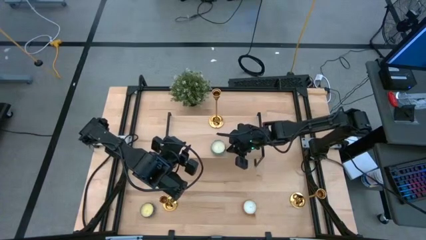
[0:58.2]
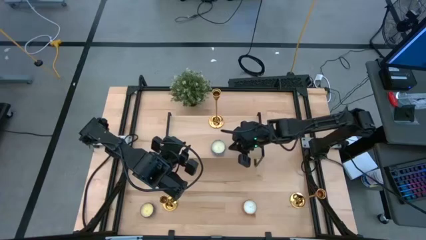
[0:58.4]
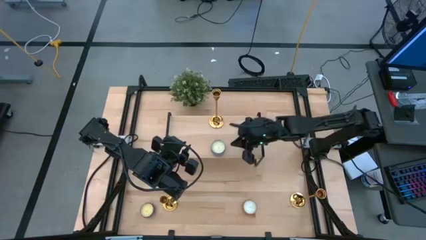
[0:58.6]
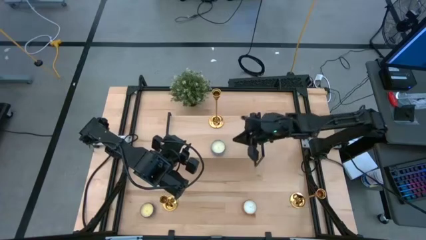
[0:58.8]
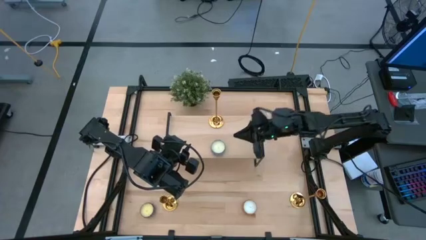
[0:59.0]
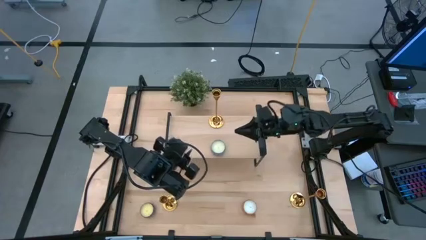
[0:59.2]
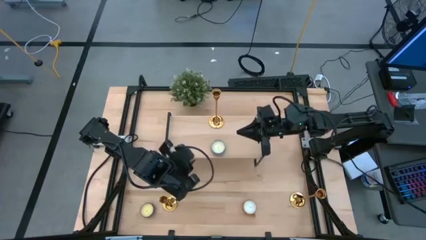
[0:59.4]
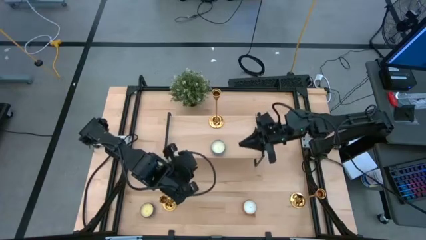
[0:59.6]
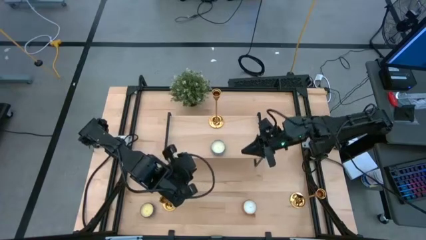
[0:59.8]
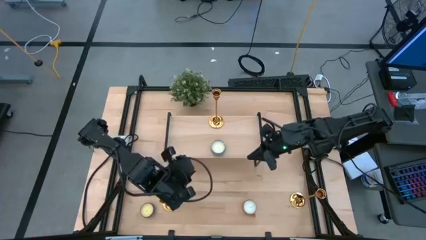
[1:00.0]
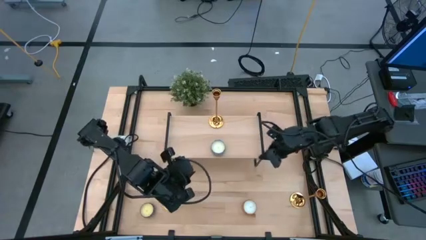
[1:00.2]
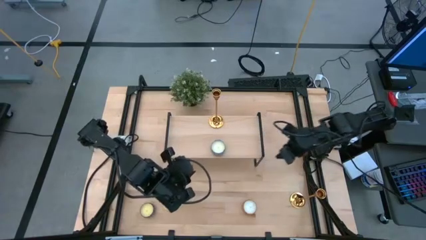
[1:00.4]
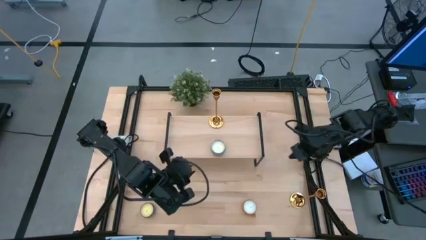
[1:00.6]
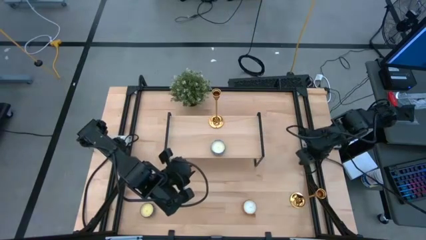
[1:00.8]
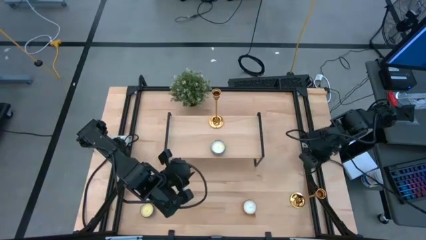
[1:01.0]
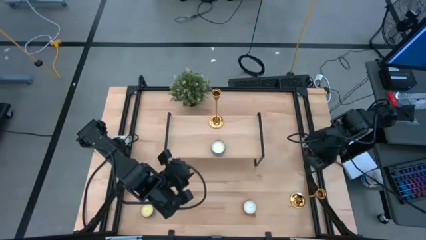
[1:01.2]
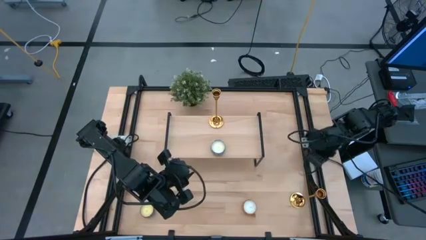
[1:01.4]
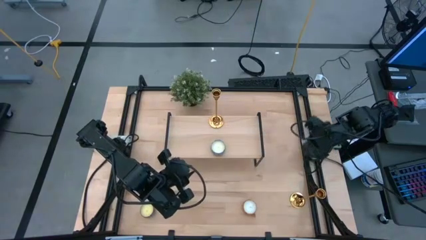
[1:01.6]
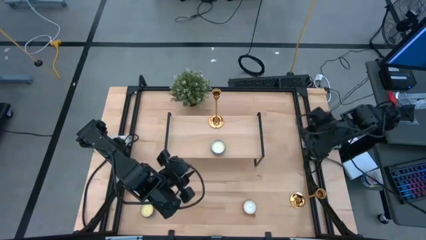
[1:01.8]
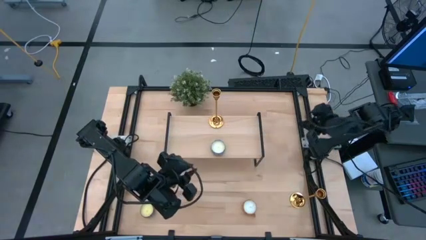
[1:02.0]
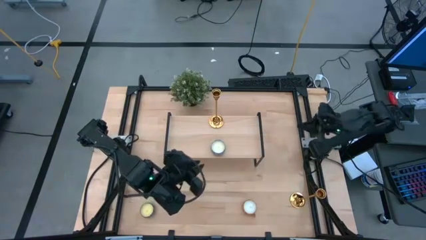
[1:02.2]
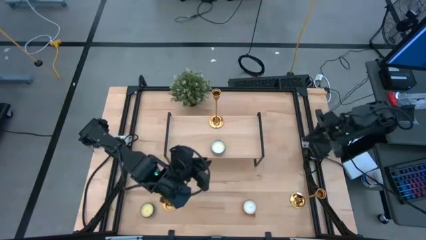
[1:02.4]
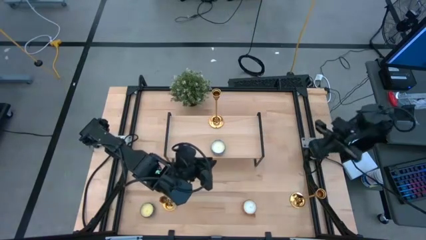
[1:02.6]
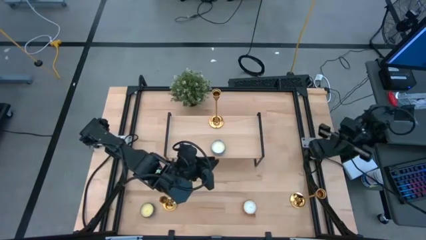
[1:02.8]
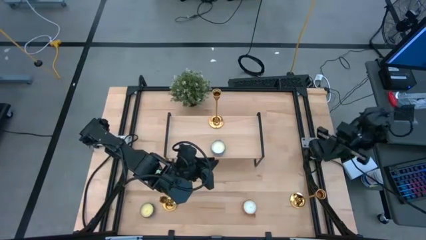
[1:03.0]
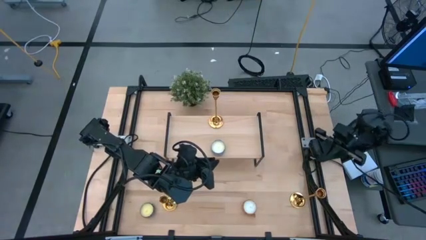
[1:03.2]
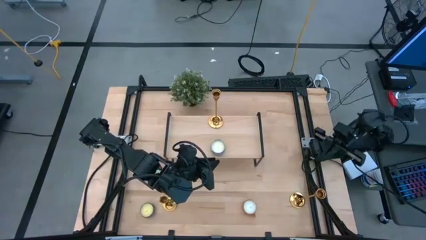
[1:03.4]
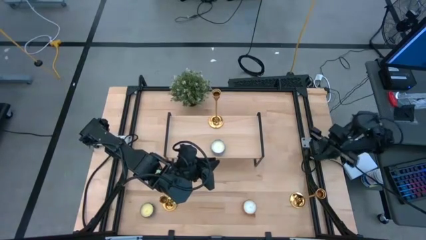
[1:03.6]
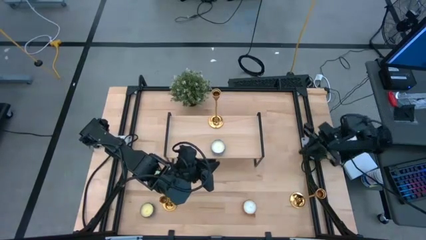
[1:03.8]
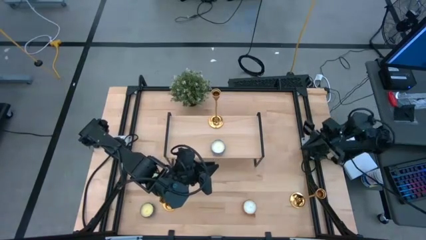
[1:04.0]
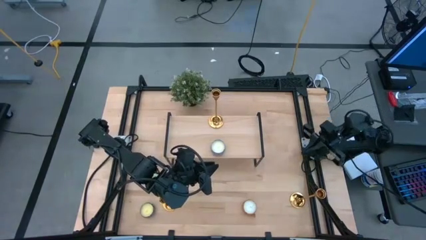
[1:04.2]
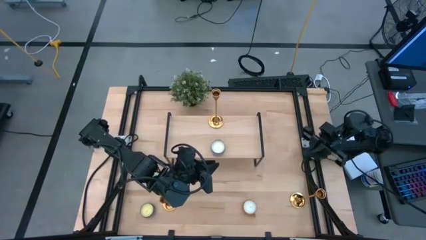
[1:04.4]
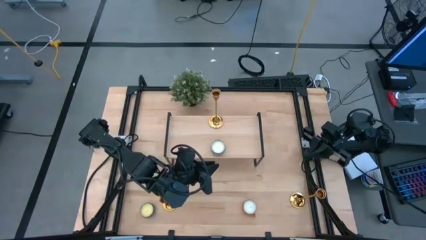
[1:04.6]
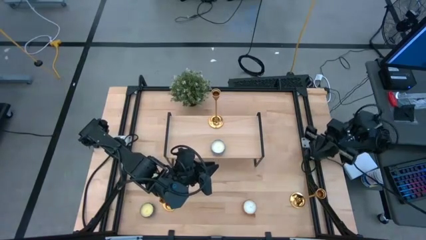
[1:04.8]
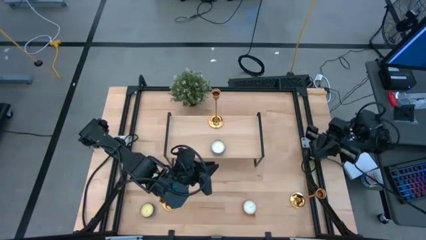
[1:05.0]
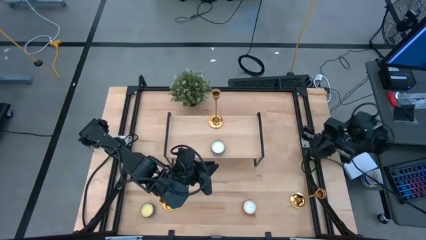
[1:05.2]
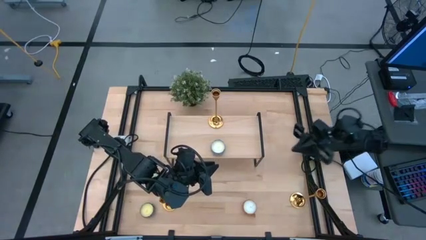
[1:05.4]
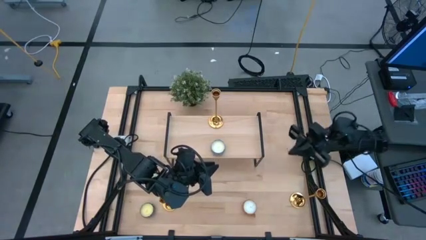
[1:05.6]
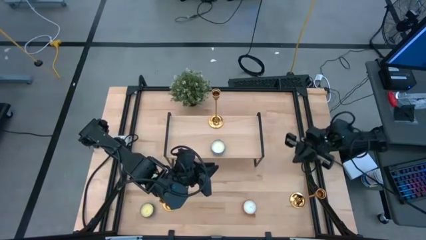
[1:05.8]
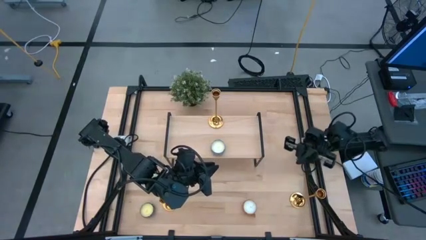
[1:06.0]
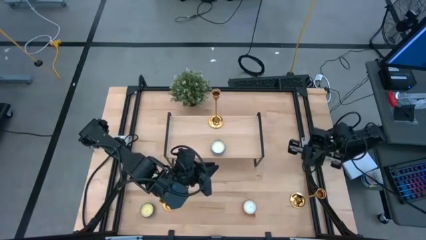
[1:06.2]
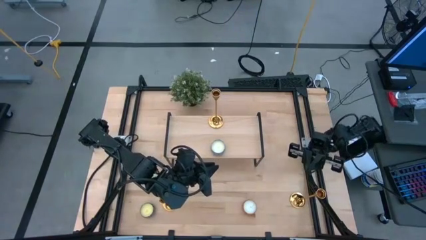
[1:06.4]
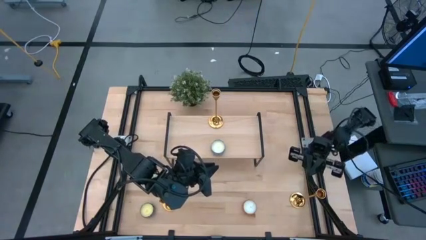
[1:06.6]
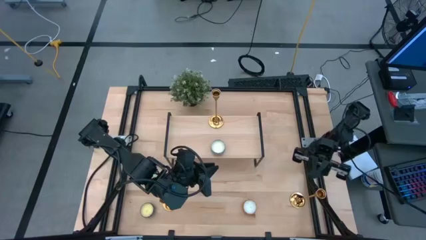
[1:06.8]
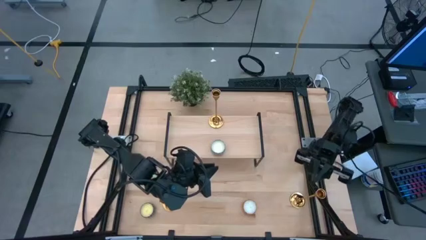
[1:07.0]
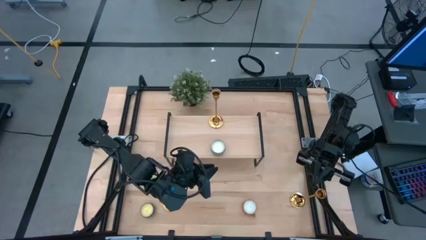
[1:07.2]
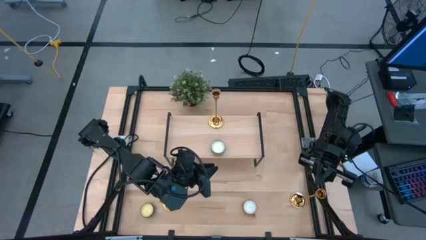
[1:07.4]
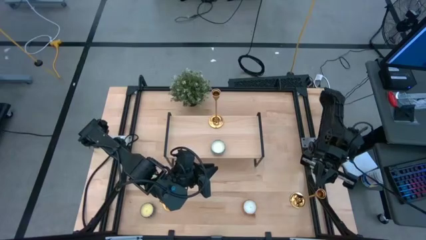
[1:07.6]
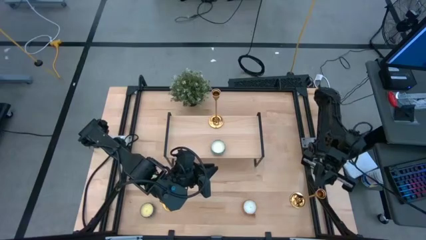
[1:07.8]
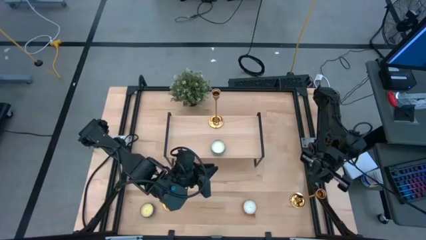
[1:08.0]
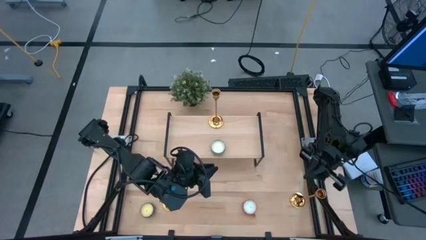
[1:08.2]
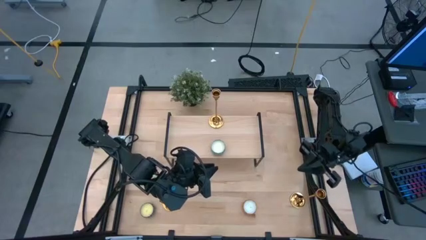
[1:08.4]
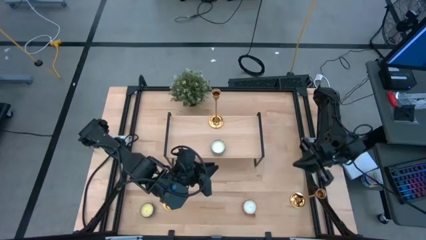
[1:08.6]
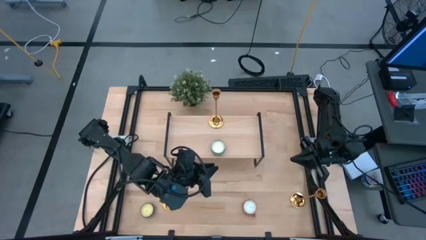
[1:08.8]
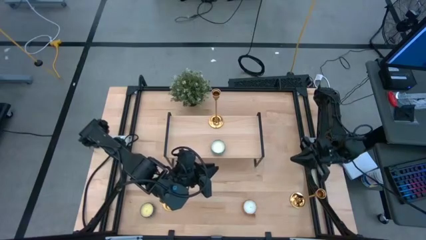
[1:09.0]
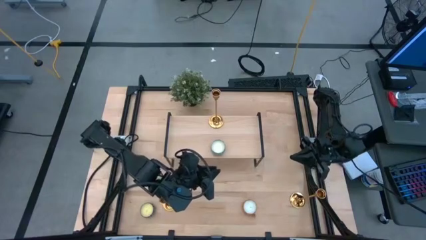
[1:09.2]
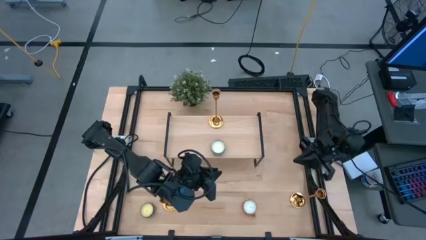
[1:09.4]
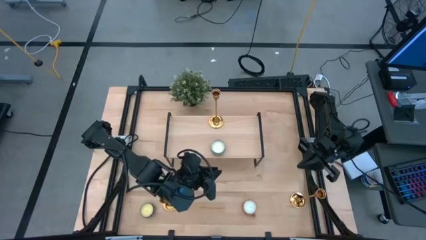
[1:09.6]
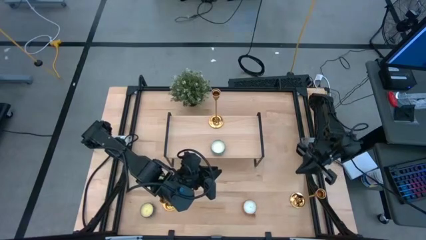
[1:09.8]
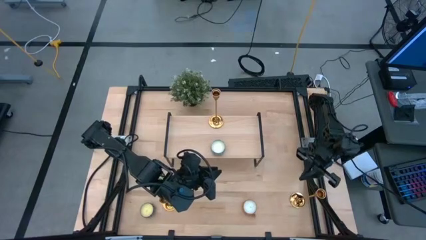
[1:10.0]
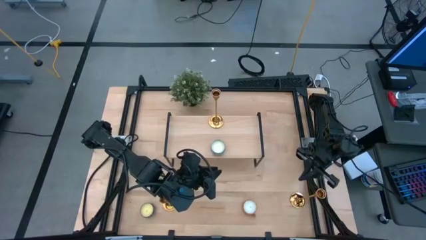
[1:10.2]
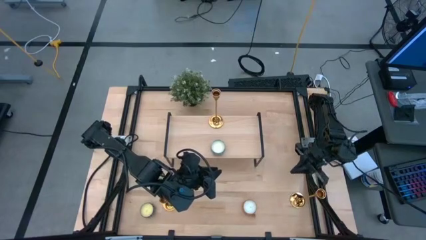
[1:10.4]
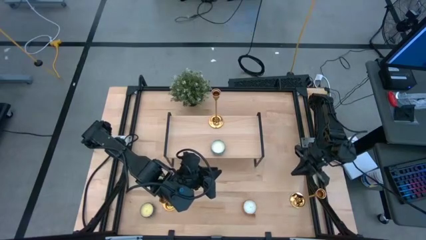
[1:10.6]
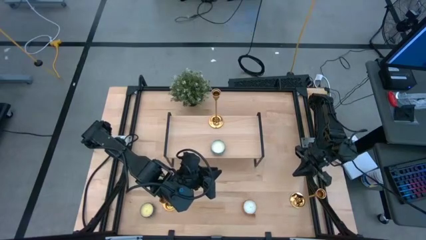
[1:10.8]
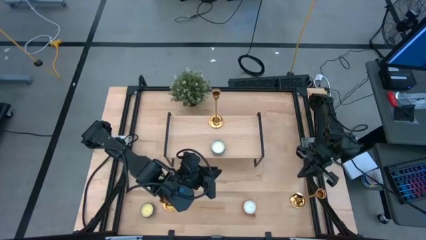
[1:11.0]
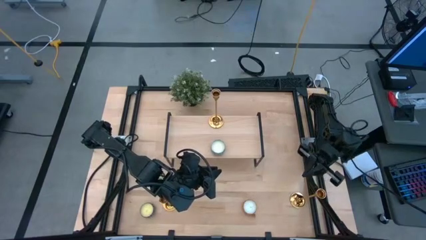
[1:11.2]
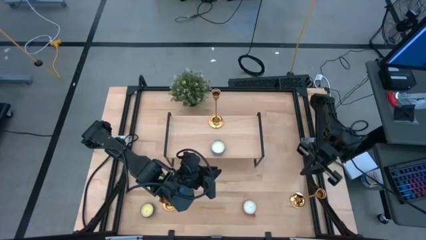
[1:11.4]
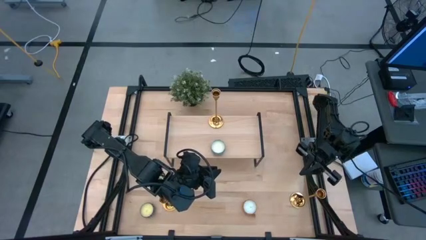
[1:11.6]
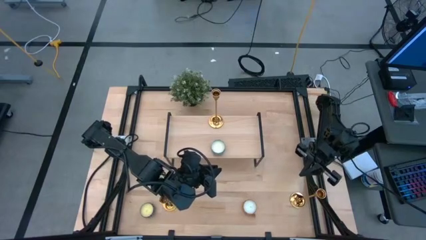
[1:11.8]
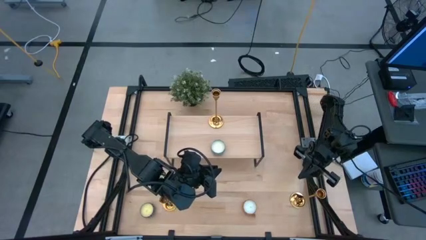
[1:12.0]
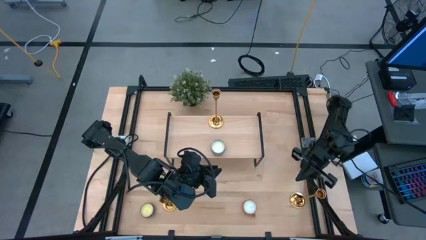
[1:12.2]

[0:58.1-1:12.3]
Task: Stock candles and holders on shelf
Align the right gold candle holder with the other gold candle holder on the shelf
